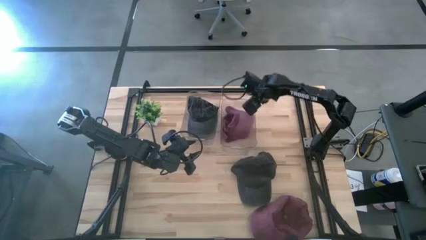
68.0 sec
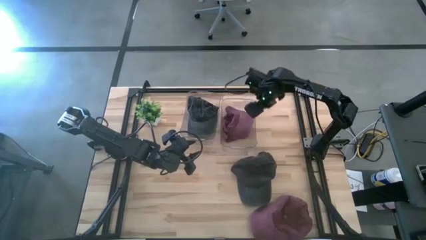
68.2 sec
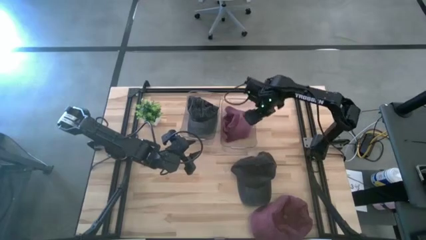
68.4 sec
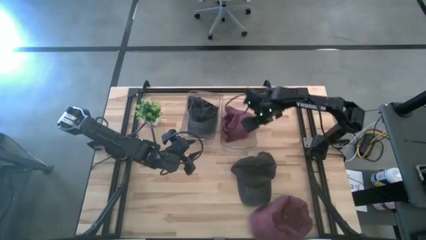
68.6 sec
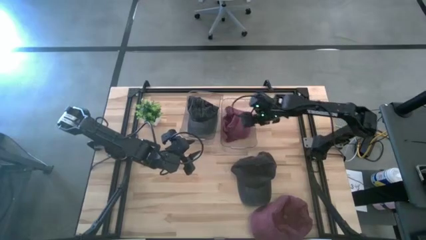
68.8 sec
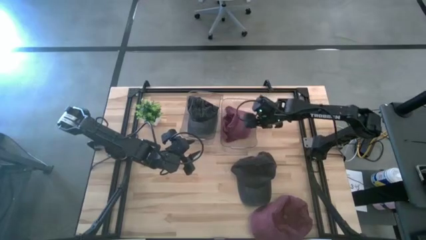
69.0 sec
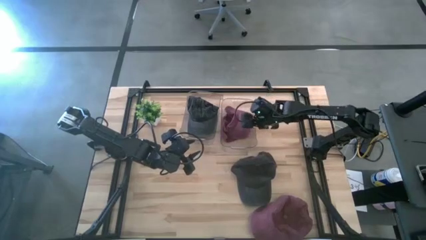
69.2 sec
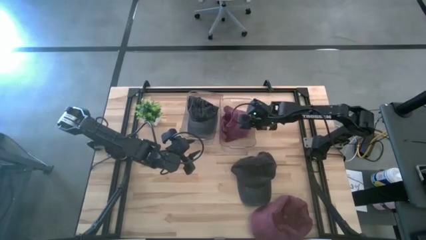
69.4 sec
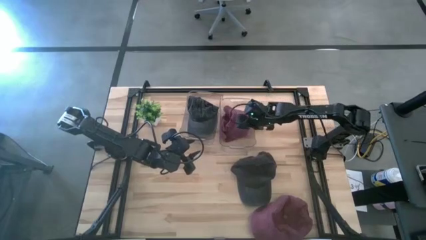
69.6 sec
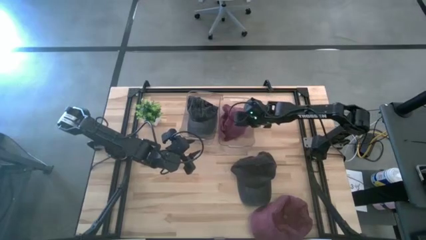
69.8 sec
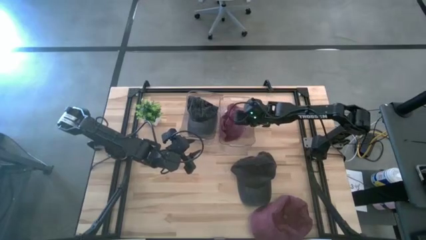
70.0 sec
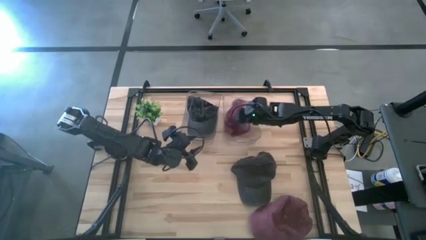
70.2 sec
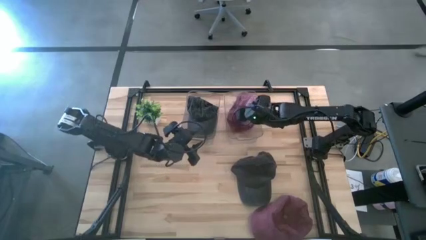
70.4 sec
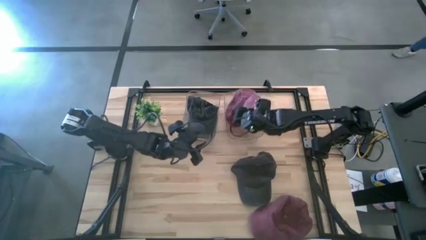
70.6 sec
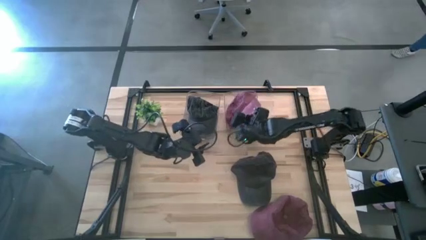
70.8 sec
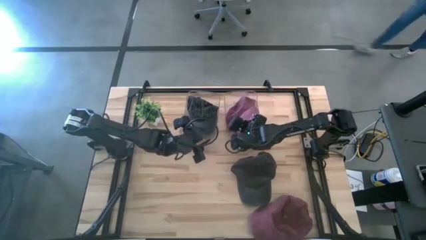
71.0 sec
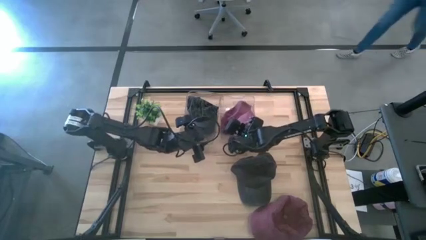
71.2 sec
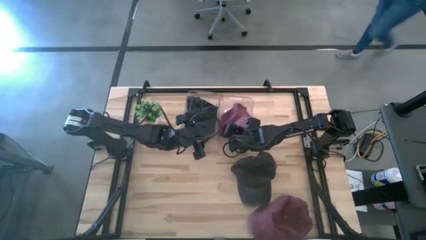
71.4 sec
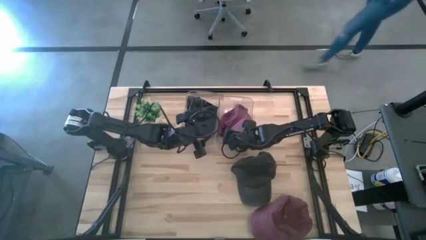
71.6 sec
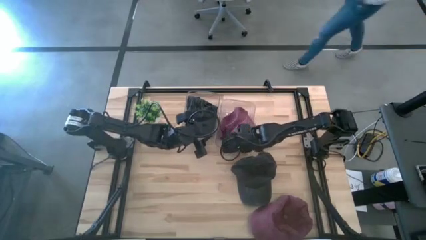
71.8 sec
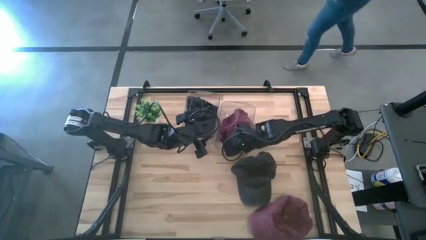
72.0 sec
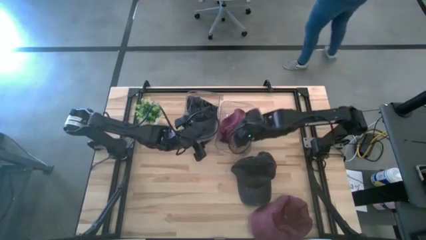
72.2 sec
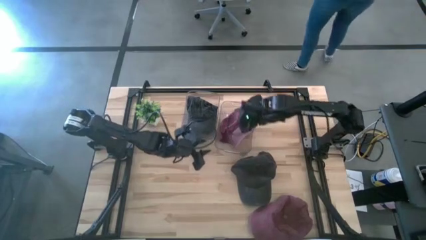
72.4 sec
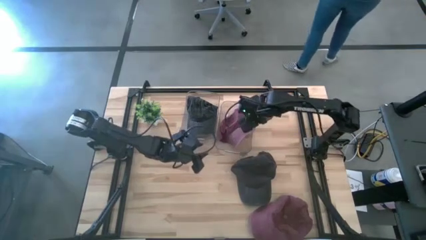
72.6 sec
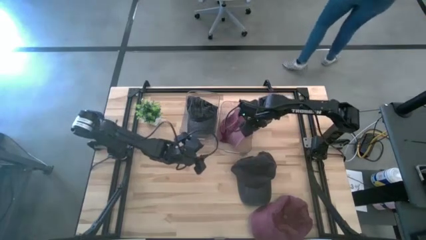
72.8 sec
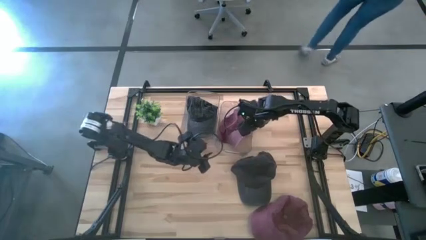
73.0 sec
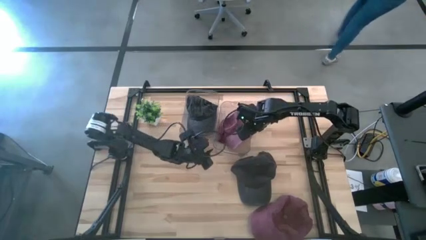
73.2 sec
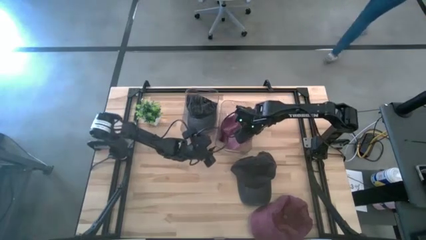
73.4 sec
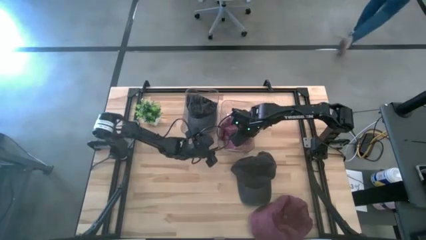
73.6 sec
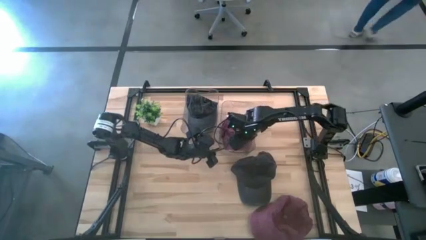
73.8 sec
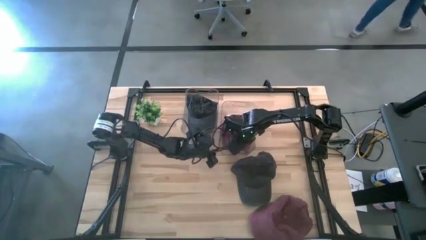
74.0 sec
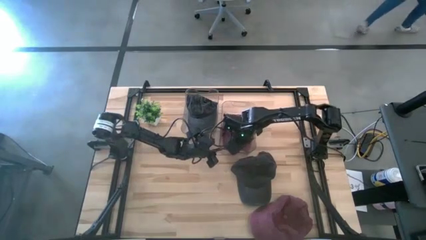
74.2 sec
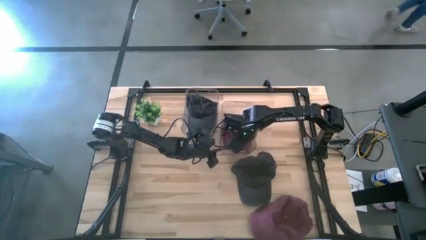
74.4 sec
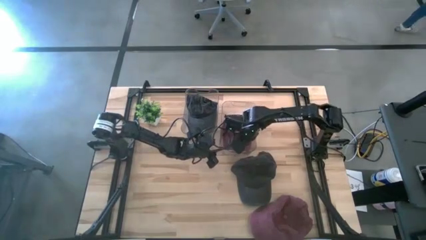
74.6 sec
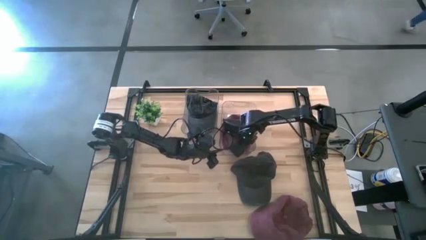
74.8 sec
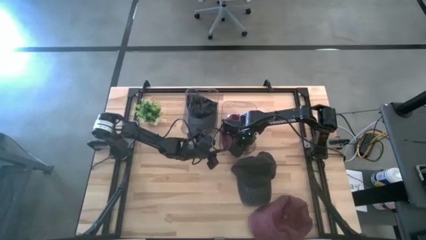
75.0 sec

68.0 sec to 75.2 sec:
Task: Pick & Place hat
Adjust the red cap in the right transparent bin

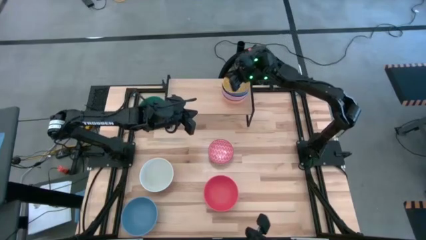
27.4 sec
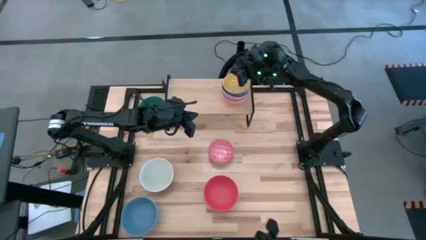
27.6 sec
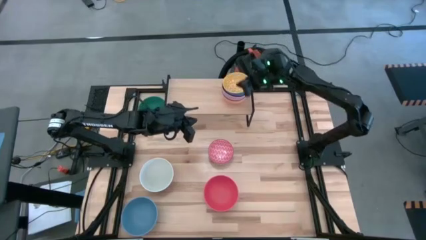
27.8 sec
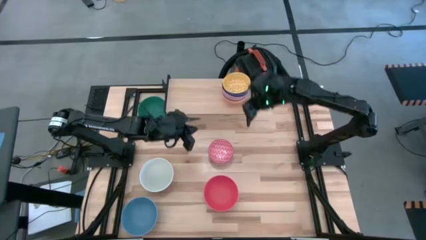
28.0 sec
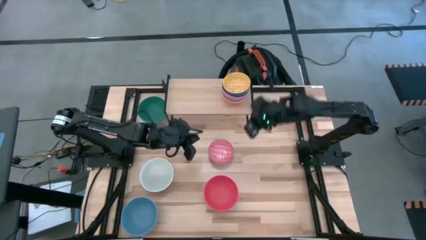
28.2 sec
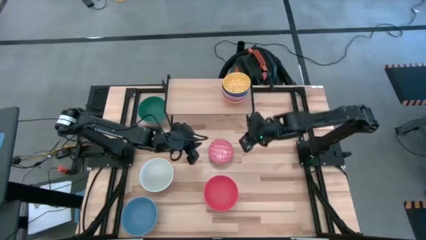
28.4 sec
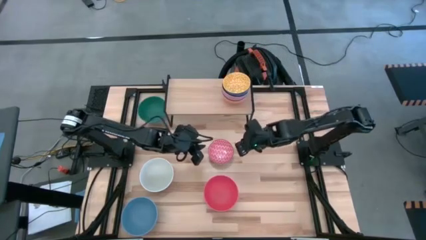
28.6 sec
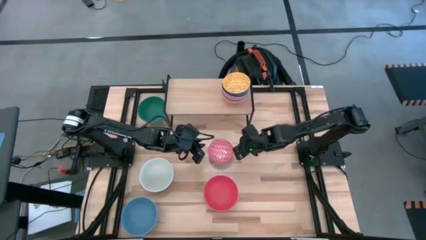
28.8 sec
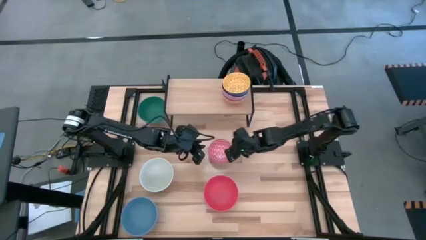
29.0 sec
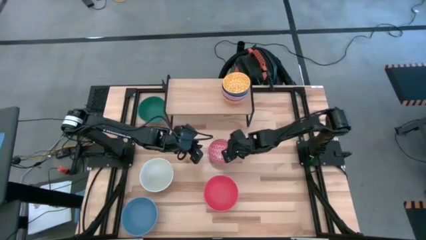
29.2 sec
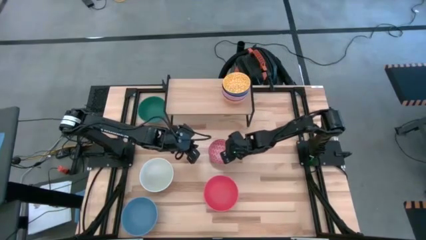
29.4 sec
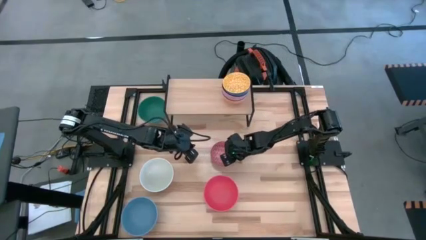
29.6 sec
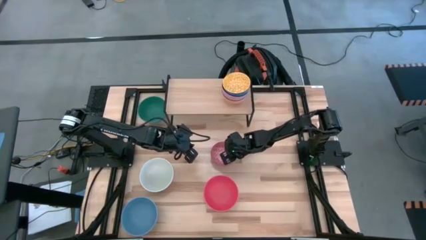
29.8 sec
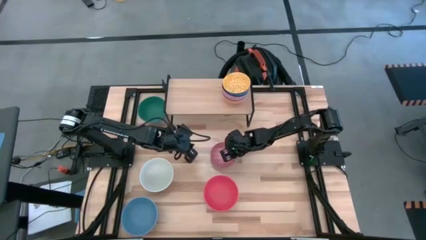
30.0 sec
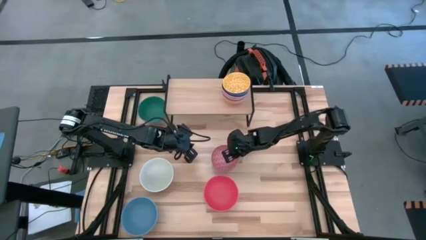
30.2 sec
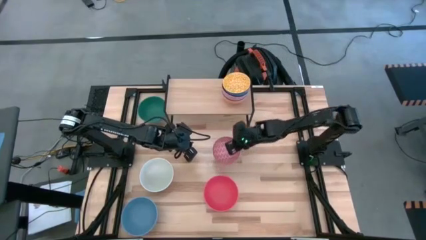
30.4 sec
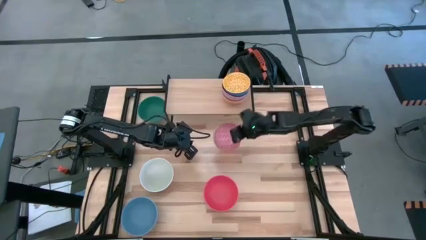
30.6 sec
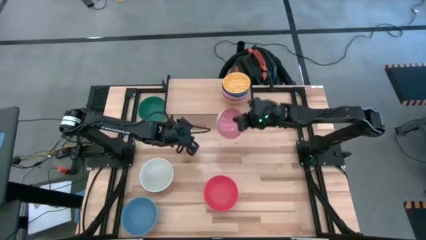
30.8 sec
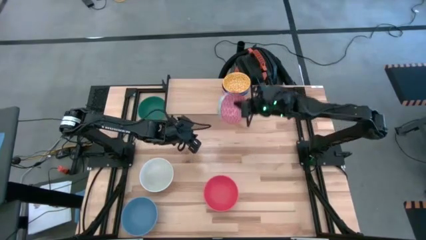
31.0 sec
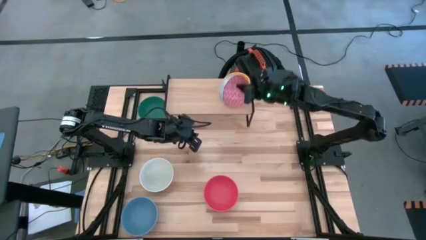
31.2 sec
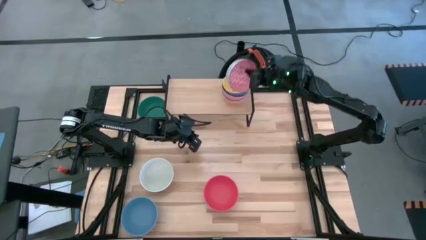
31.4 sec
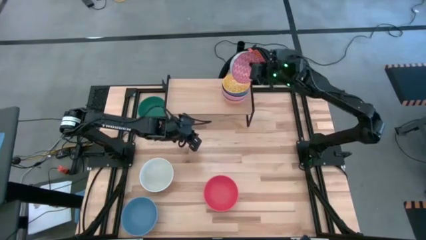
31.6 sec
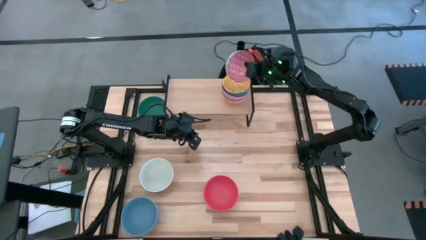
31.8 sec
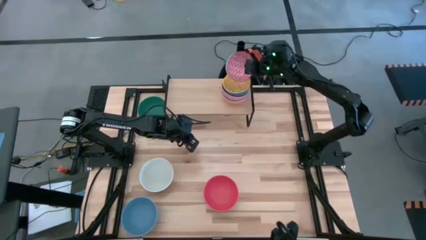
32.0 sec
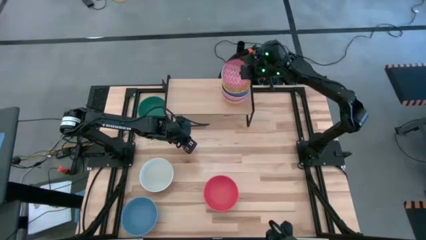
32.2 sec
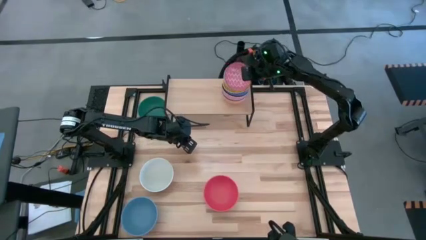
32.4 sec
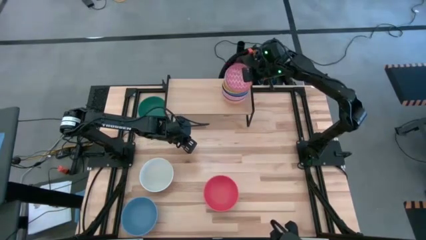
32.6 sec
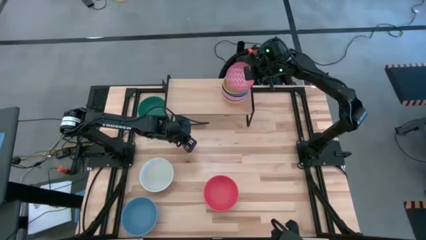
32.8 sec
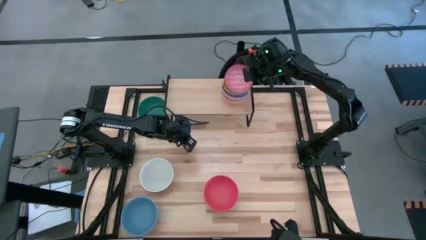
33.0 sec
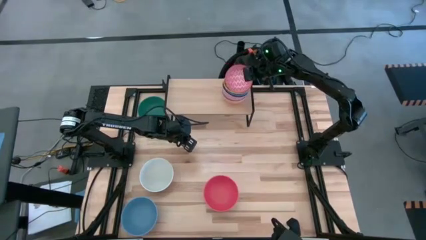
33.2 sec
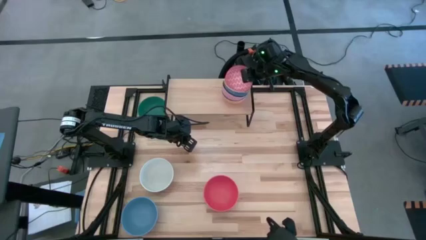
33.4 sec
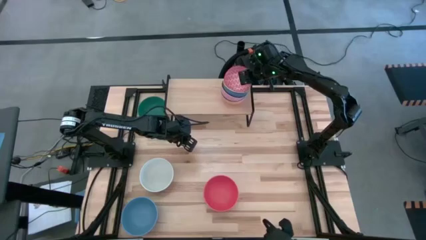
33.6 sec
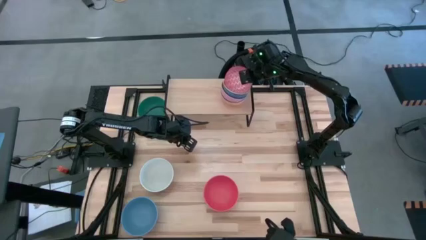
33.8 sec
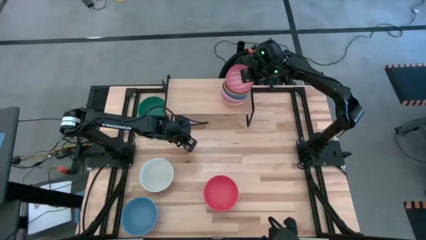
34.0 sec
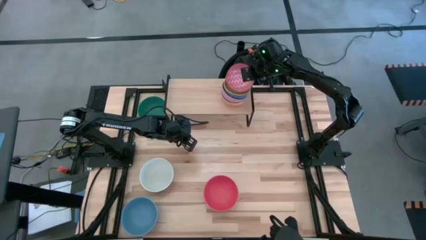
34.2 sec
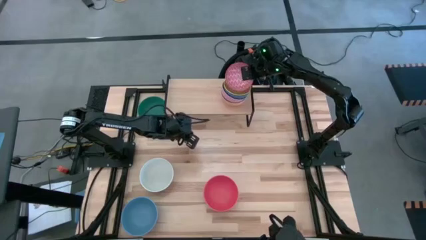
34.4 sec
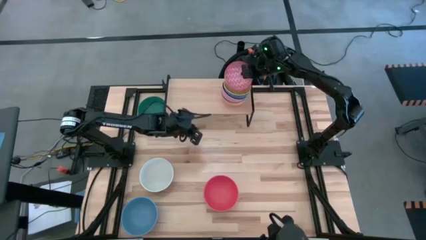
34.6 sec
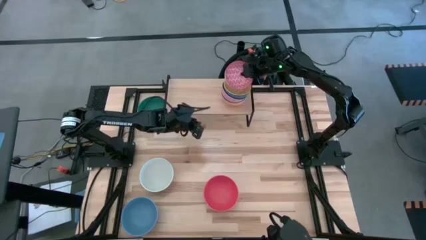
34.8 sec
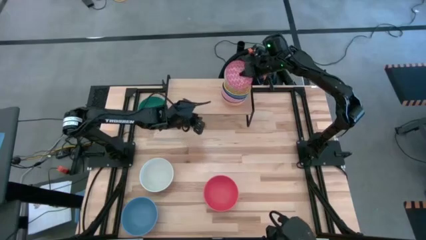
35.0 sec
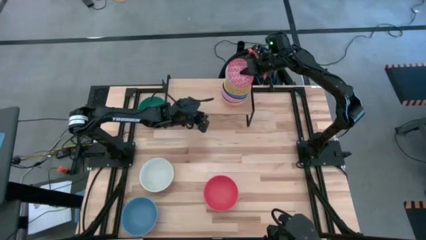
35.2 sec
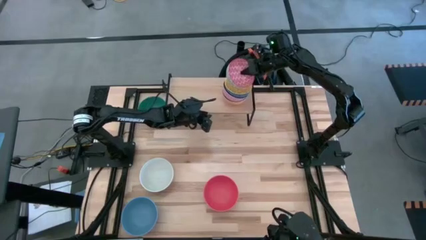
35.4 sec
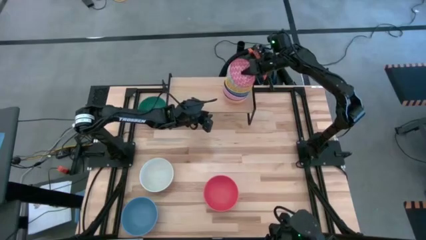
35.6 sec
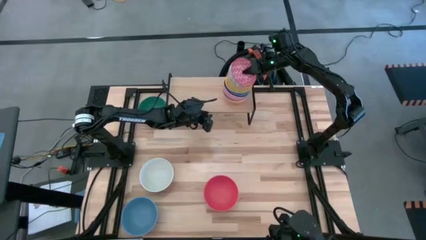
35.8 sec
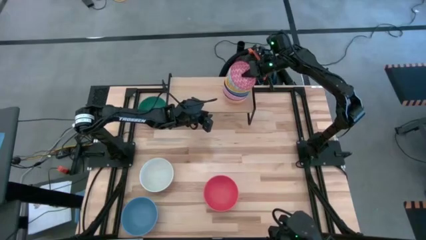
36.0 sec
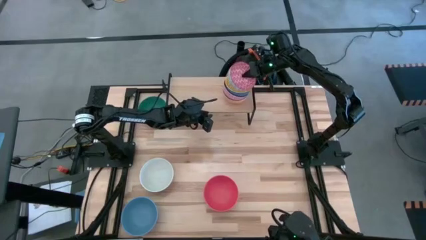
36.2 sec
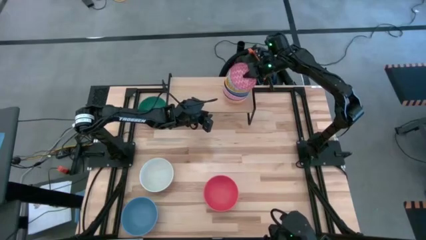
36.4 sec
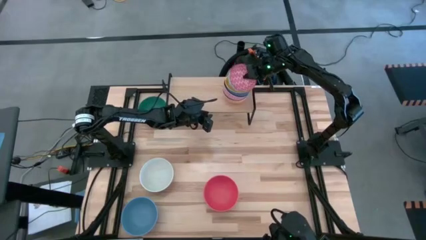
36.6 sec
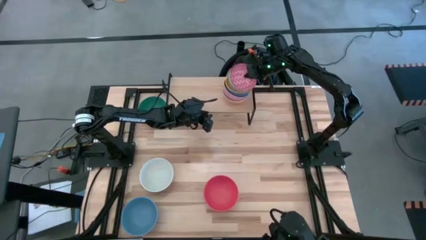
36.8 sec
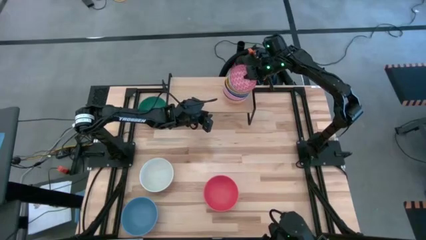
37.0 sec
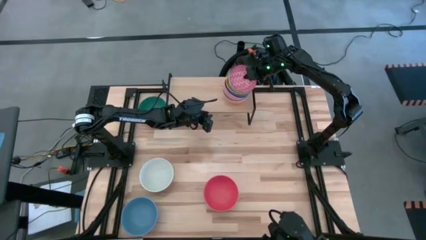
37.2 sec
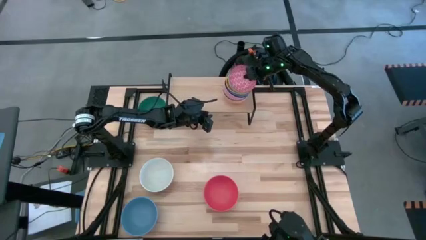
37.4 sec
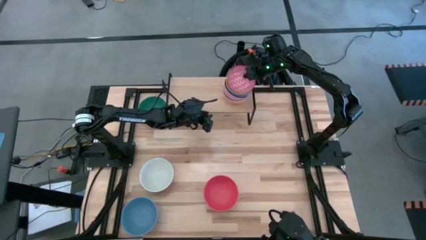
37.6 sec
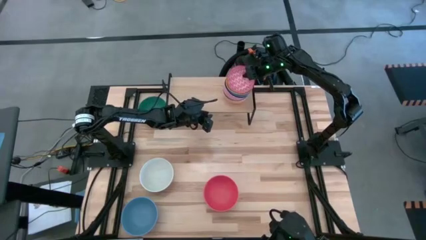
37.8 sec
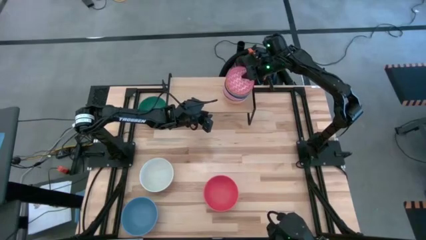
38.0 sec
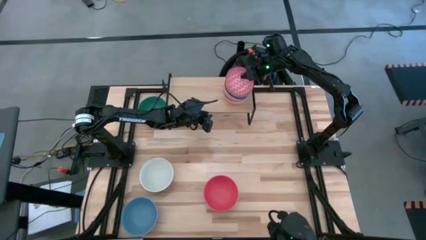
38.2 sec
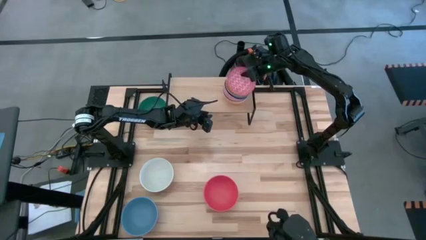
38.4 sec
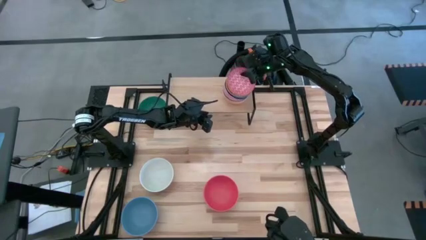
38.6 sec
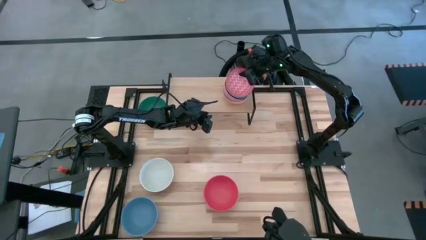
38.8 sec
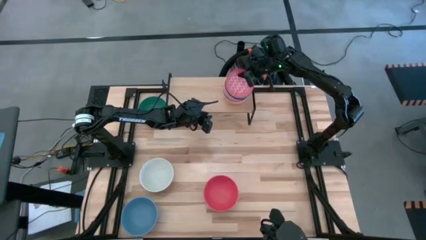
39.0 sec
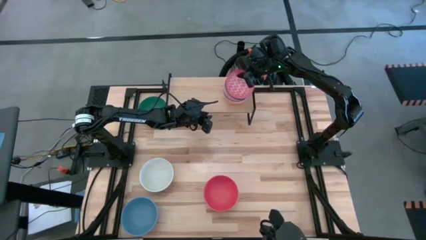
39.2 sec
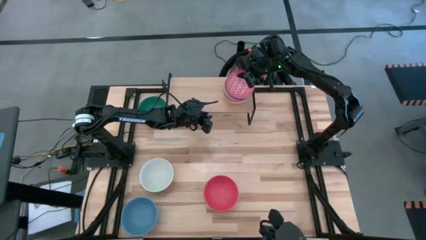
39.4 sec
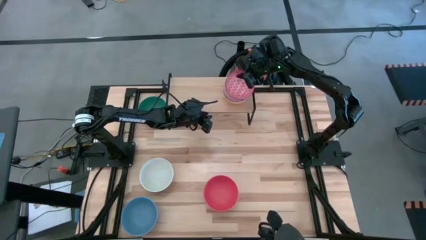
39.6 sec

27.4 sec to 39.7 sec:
Task: Place and stack bowls onto a shelf
Stack the red patterned bowl on top of the yellow patterned bowl on the shelf
